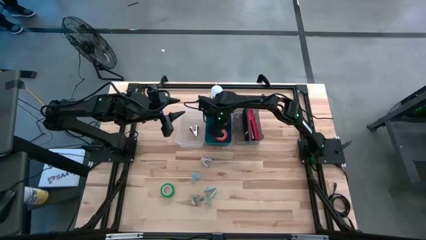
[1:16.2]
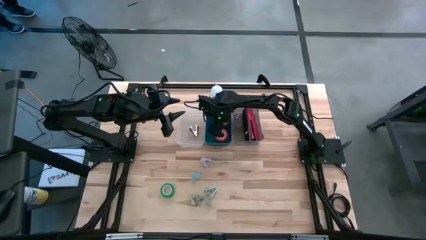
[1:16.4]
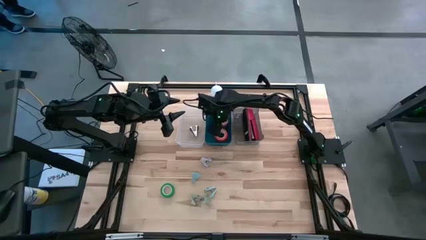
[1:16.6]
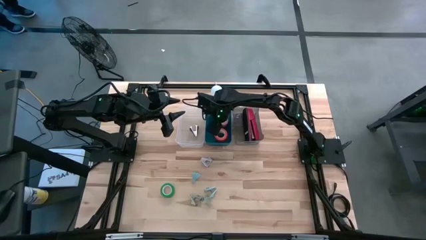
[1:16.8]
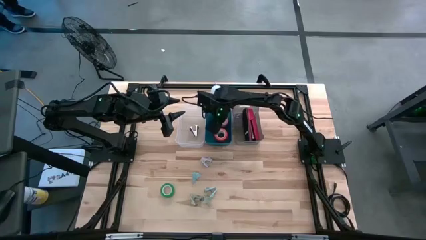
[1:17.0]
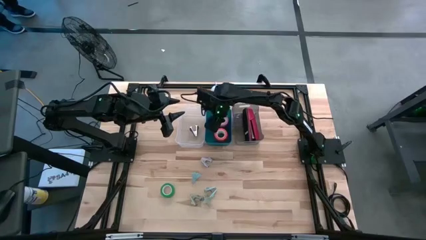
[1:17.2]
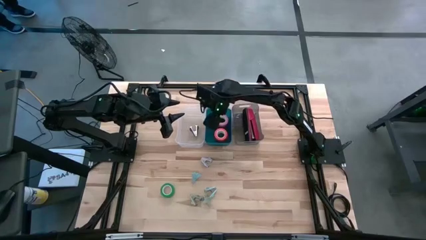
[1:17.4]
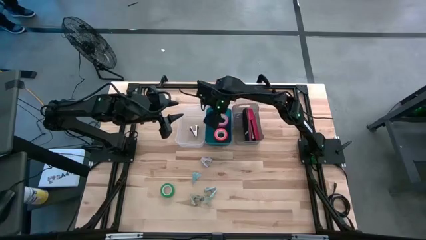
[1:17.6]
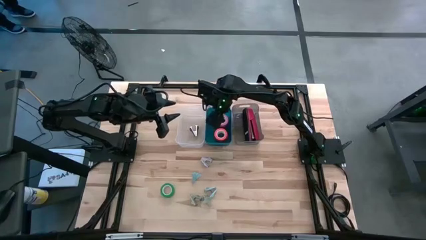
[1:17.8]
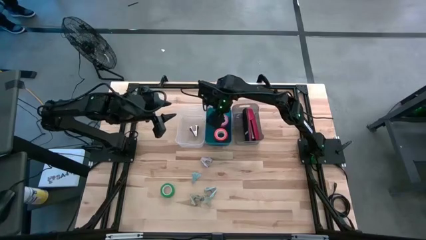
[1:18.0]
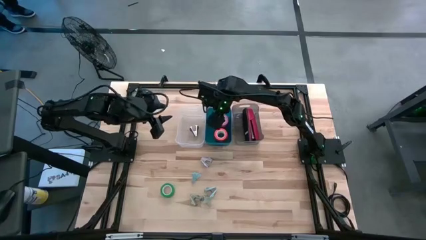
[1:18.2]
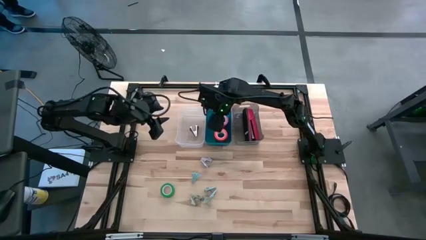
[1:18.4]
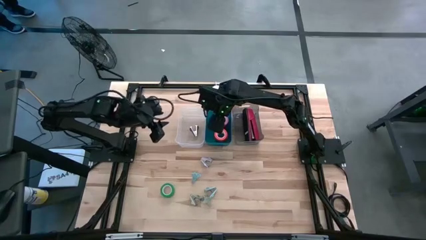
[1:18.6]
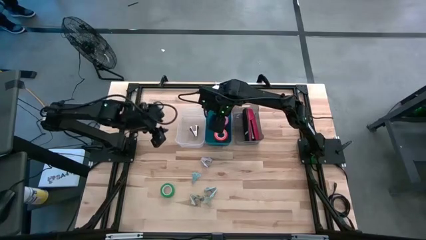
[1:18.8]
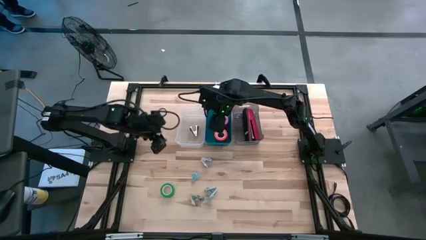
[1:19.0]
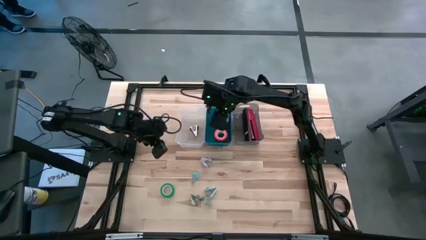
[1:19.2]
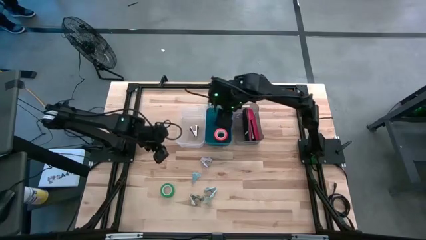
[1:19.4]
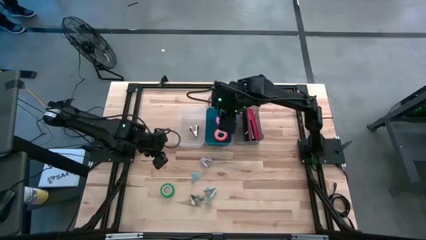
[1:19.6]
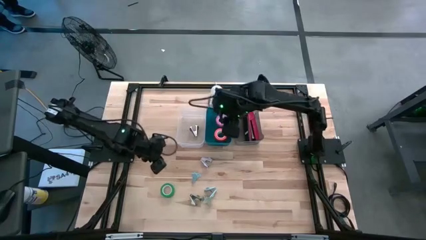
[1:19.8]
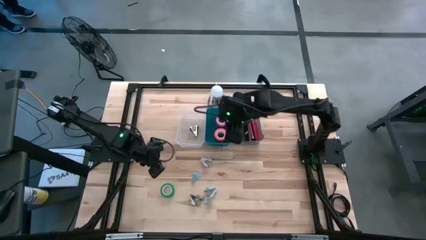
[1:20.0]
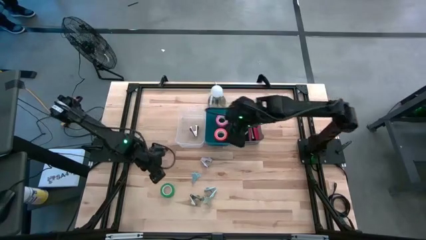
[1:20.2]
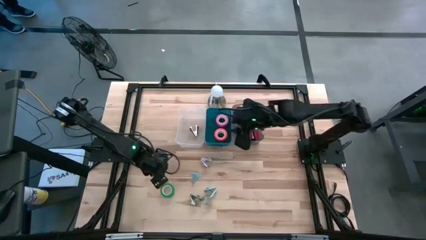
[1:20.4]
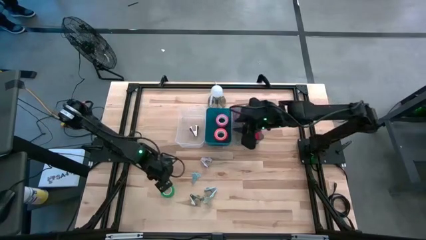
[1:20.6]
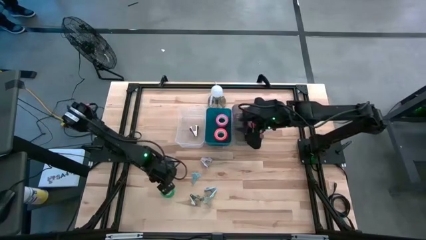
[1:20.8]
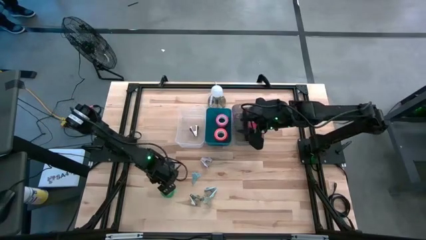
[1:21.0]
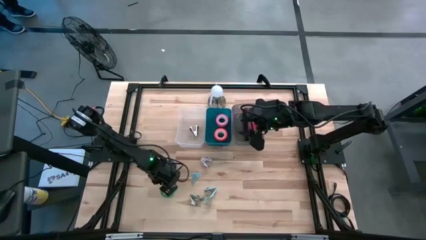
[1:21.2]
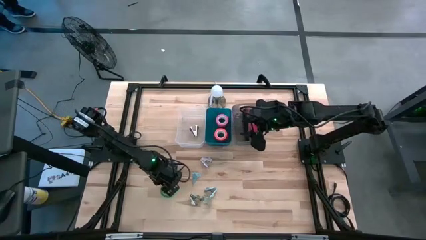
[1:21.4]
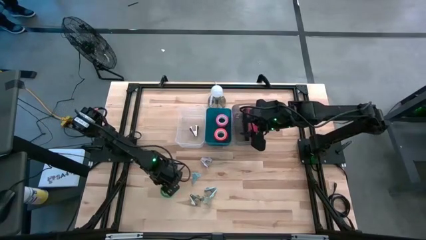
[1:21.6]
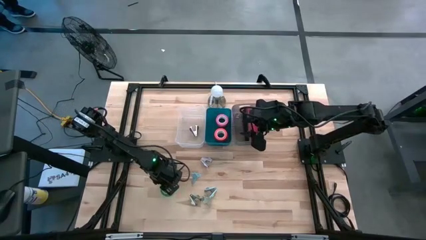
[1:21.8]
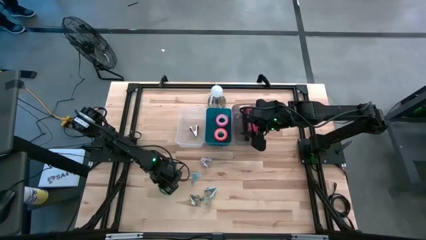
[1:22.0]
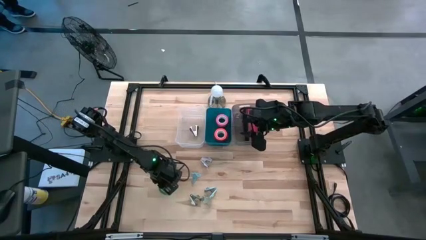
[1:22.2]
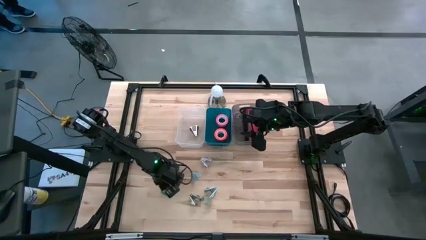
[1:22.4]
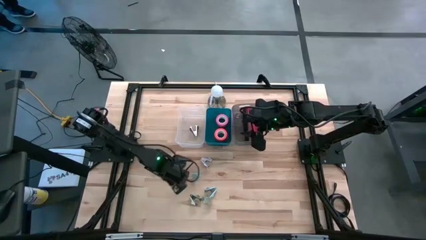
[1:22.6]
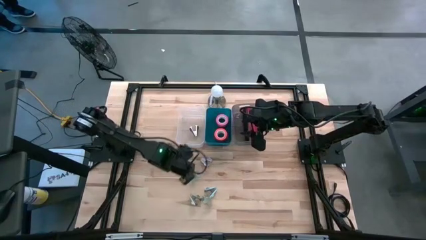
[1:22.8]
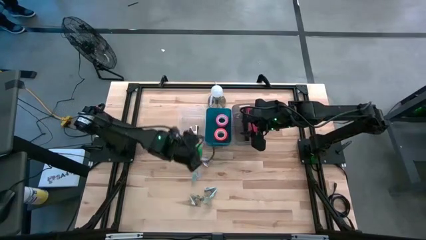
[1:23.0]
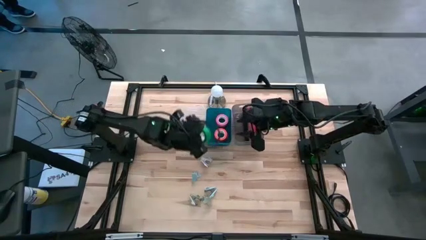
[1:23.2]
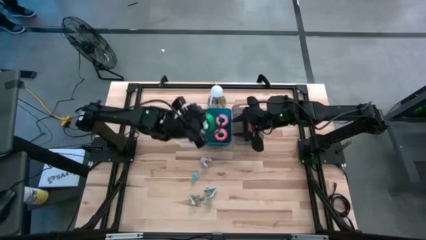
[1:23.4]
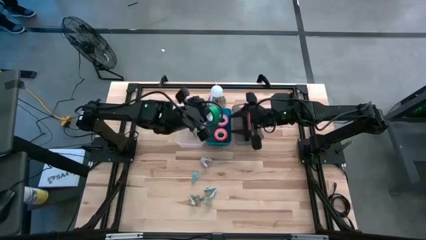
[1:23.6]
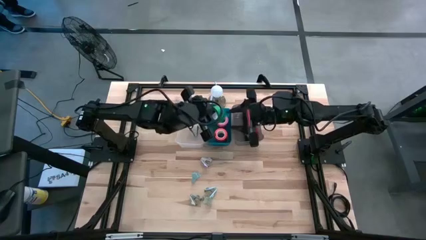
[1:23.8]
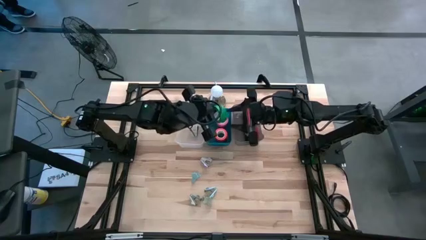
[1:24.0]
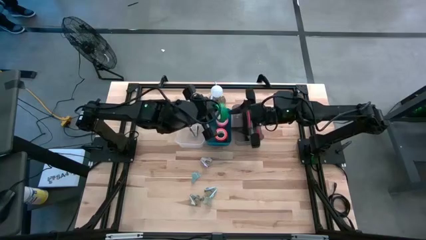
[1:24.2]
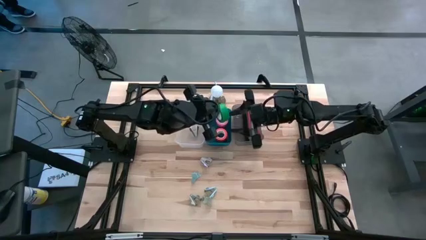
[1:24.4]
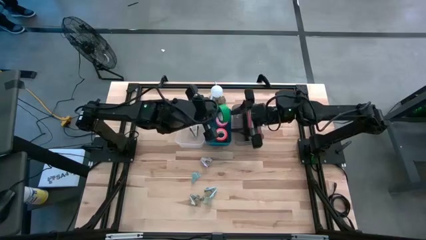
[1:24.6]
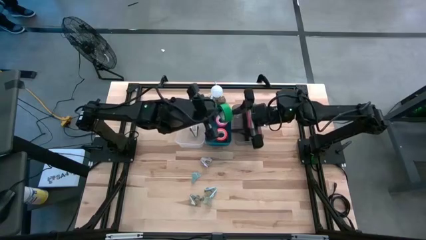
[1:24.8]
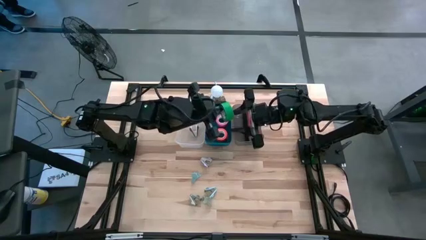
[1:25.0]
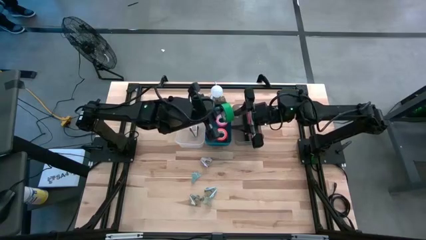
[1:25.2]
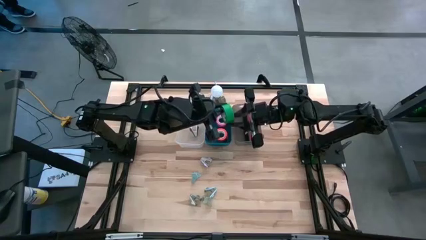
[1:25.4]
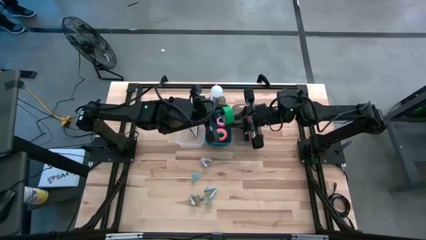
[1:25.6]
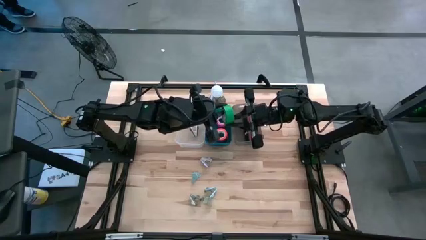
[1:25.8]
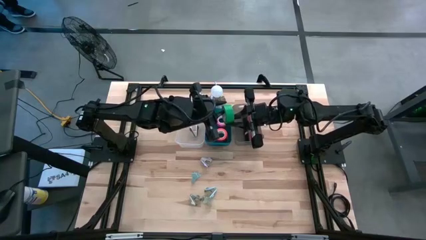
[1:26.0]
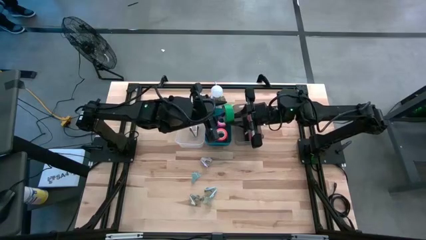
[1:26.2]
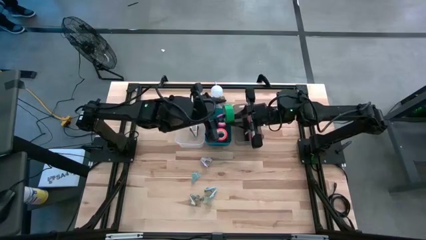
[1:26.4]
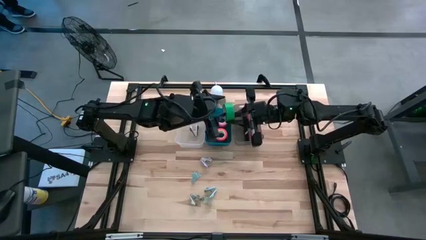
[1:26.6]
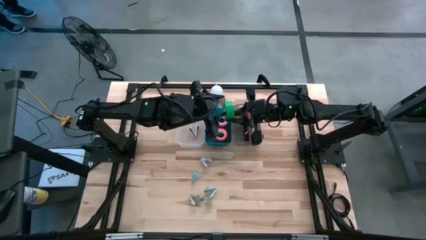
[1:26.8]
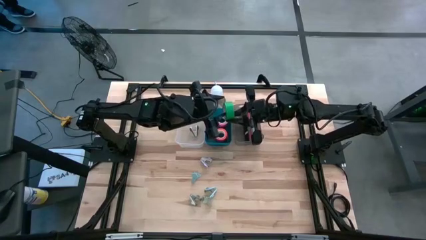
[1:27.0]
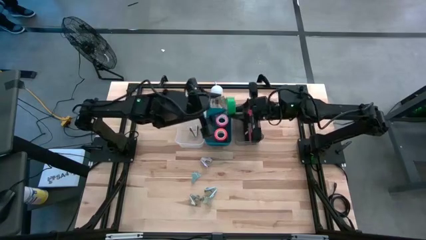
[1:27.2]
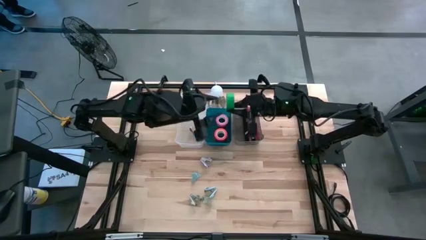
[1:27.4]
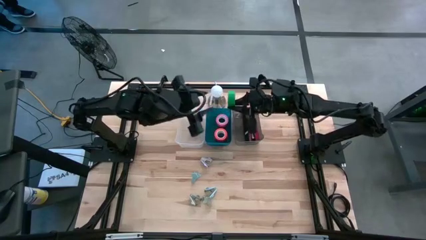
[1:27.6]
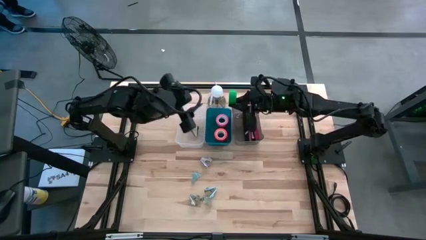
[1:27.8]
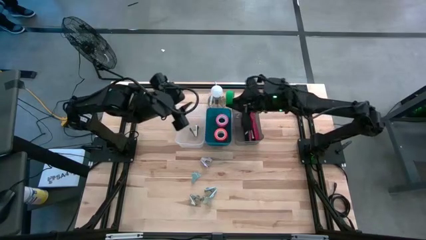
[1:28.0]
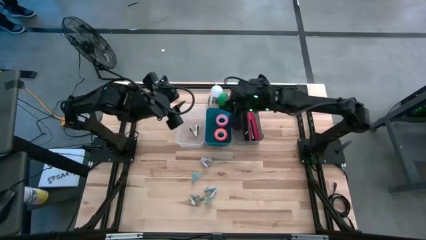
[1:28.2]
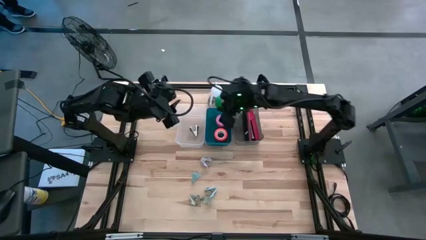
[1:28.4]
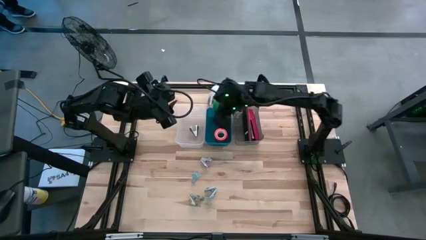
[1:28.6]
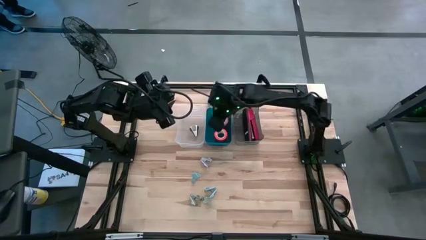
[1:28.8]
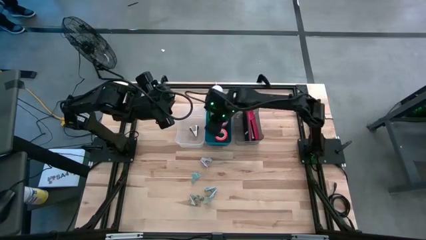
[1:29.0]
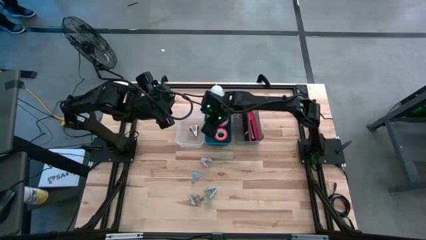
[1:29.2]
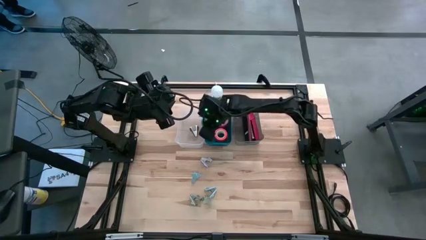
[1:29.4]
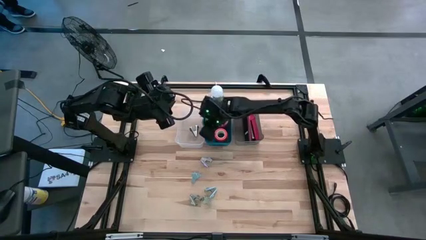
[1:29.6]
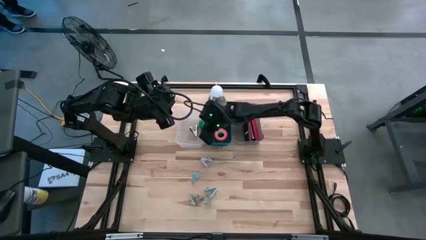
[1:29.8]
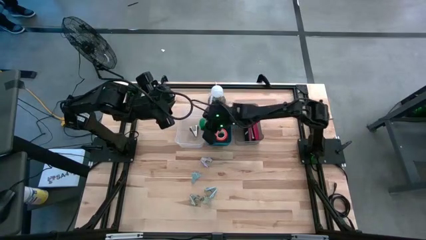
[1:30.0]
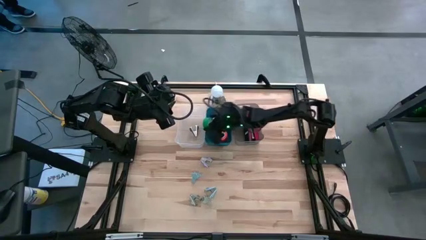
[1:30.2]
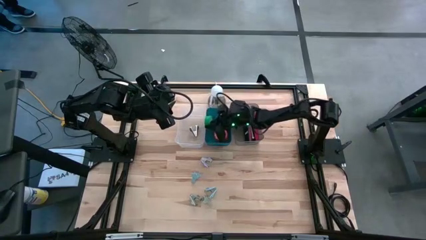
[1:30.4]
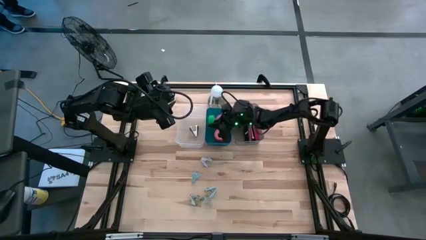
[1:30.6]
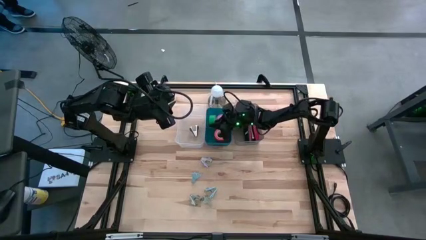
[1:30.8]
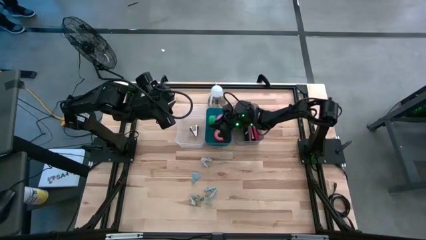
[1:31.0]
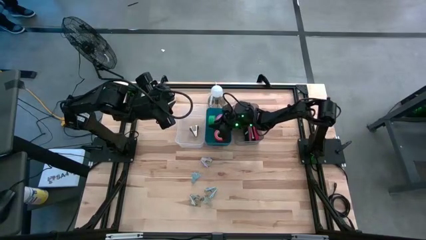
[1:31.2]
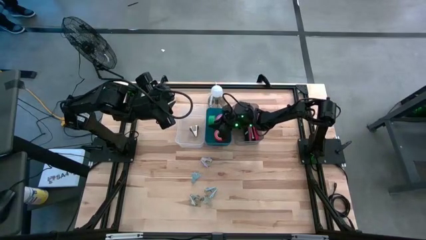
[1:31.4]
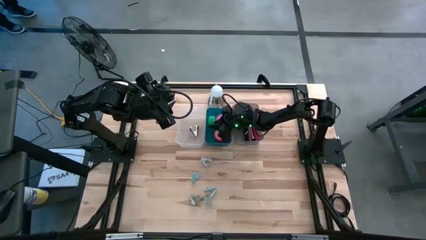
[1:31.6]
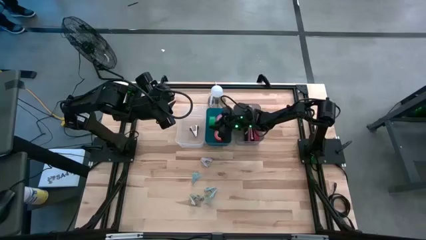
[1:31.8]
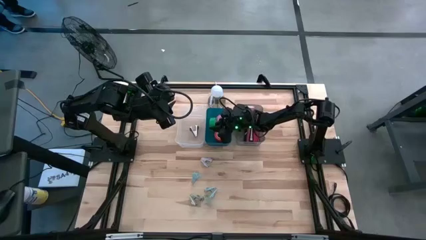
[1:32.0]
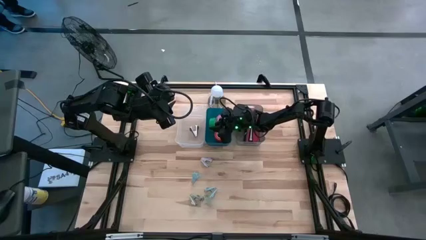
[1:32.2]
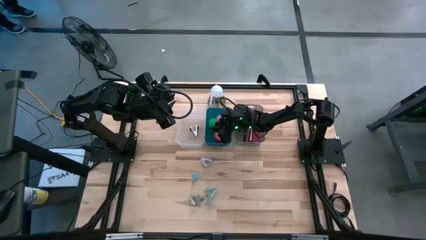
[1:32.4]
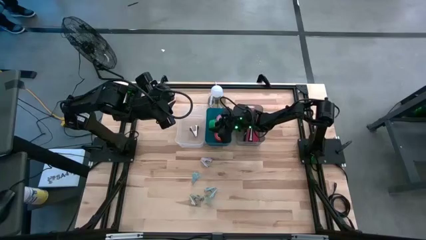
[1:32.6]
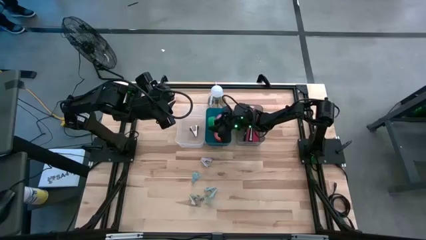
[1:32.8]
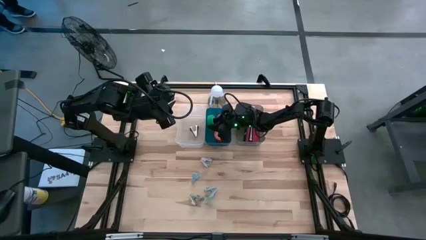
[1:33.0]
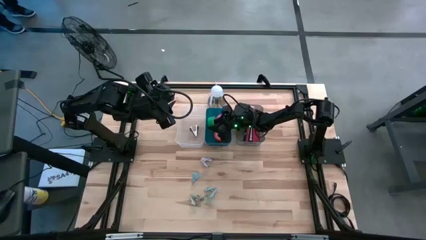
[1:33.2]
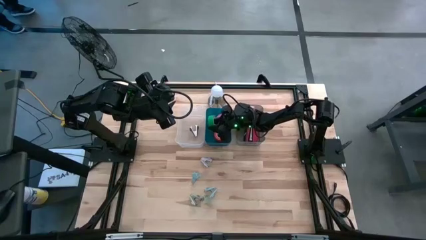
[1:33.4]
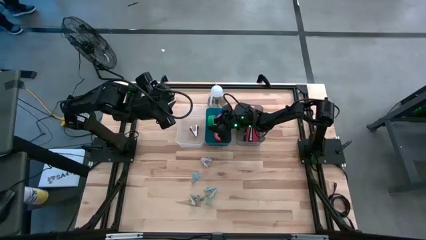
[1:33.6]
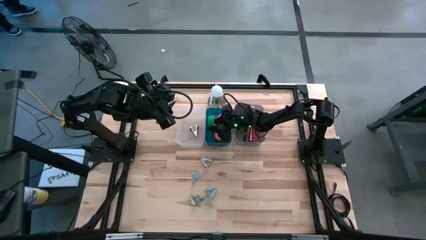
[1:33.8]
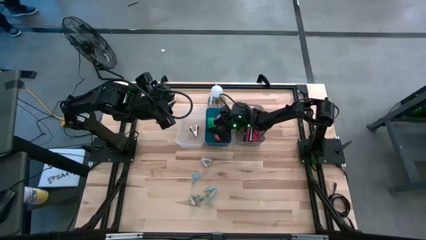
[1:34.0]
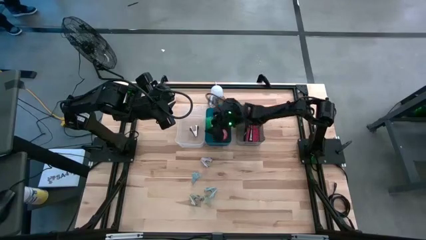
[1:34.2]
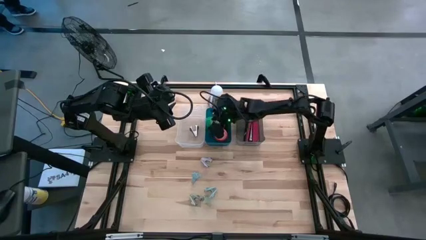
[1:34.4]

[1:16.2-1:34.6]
Task: Pick and place Stapler, Stapler remover, tape
Put the green tape into the blue bin
